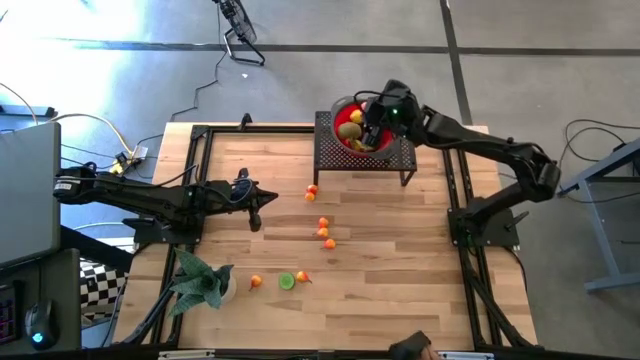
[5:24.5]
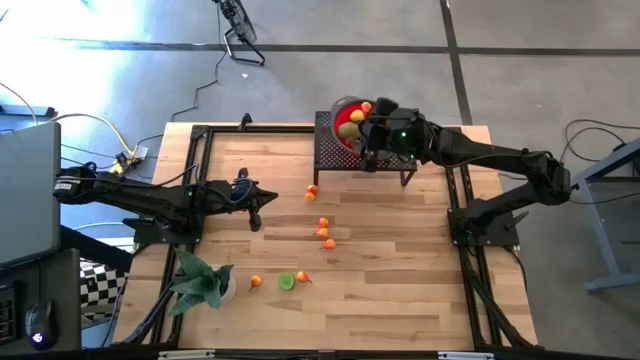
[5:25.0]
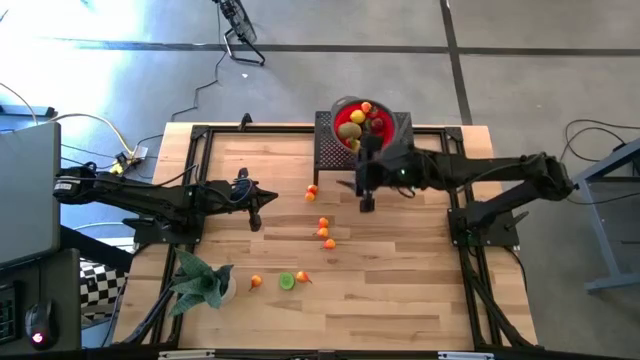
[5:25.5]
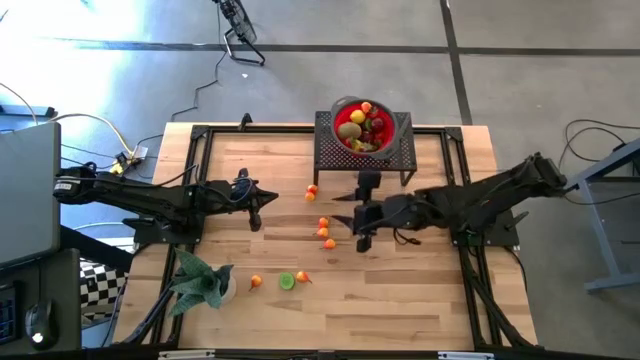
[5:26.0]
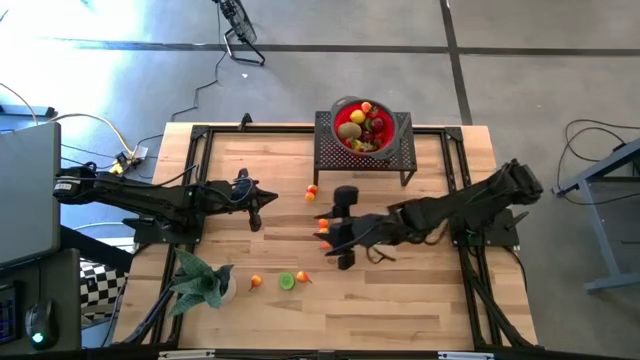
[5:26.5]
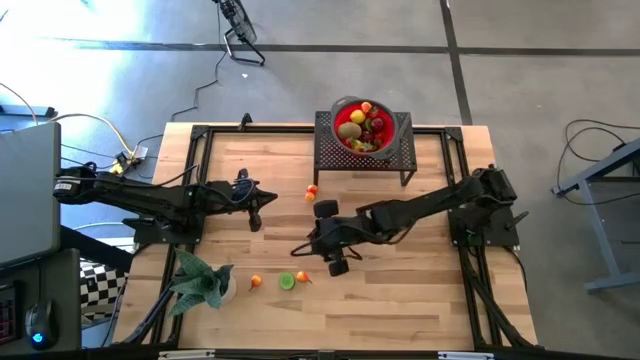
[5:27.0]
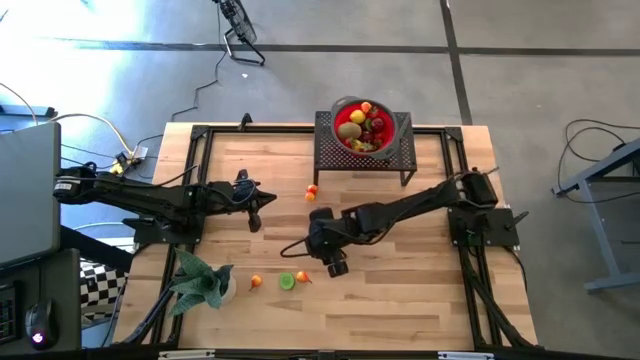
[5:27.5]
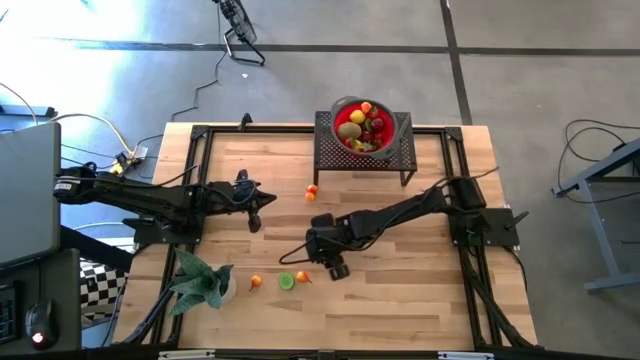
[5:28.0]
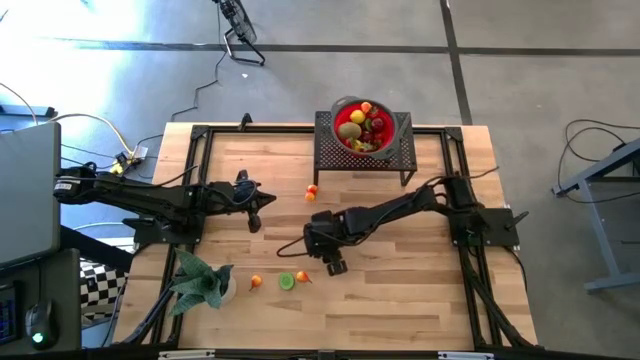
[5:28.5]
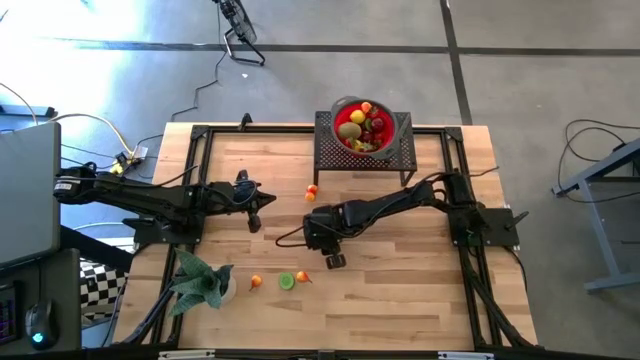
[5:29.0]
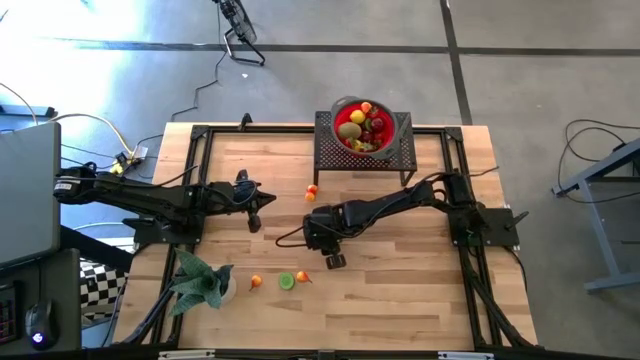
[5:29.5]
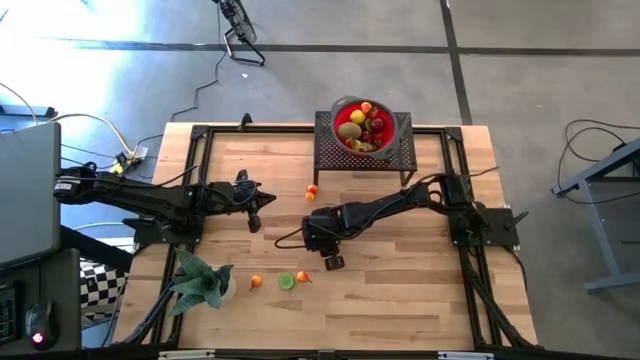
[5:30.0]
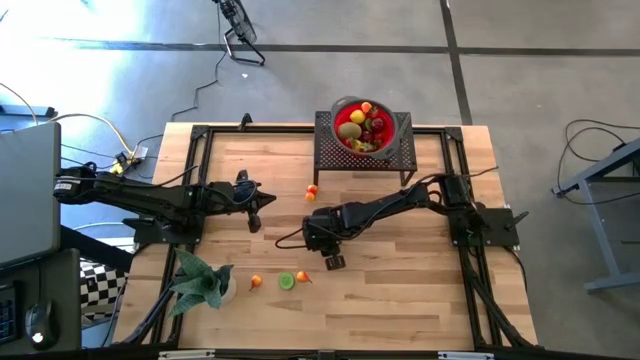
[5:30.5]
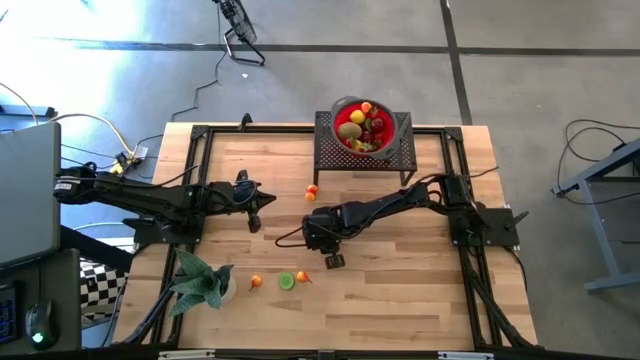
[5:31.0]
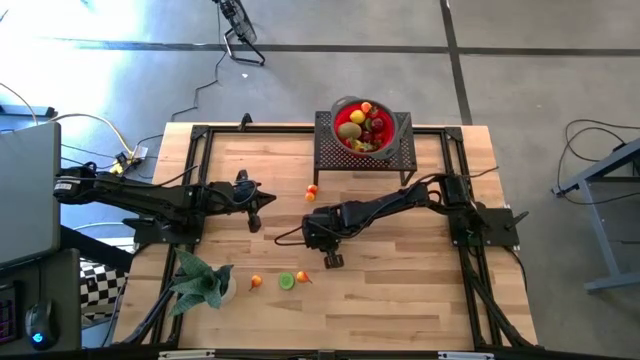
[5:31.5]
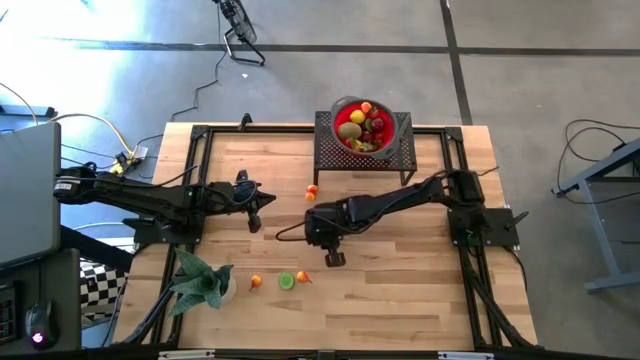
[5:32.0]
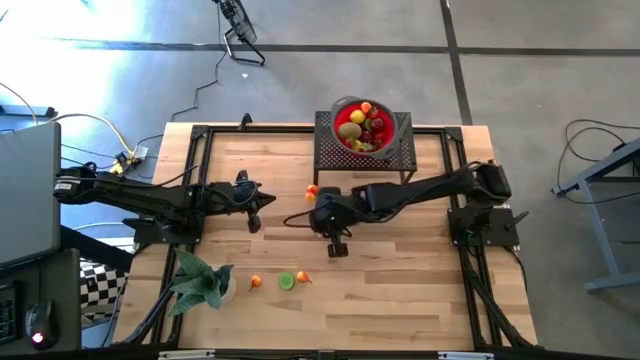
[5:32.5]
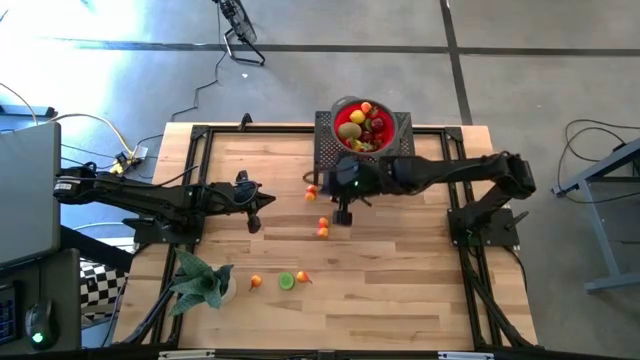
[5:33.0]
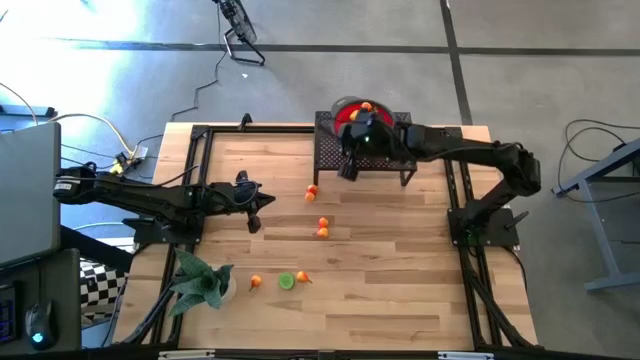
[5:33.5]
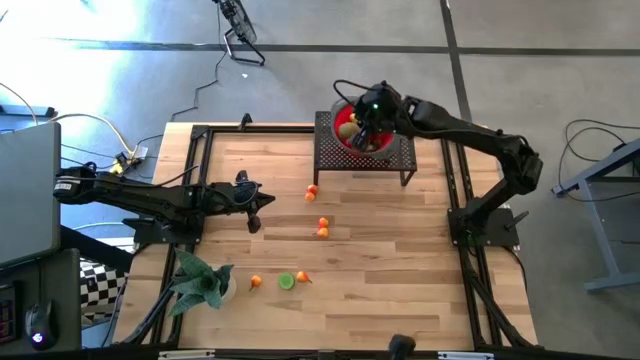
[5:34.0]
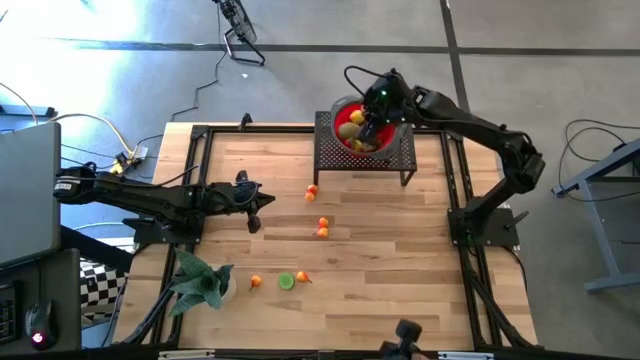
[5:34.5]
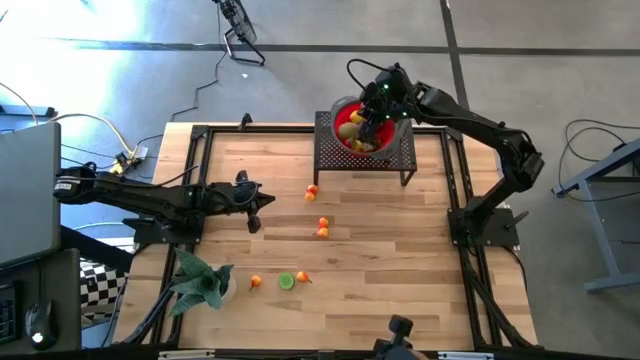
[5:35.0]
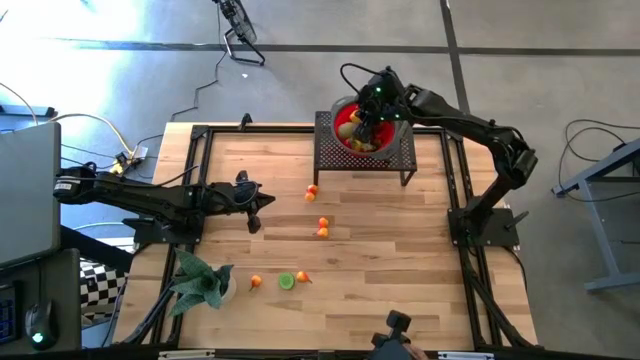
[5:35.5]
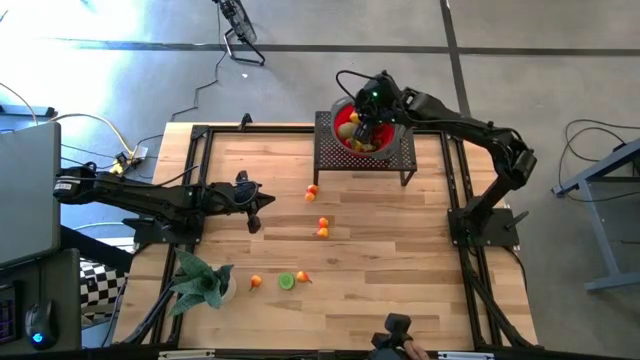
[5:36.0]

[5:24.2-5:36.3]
Task: Pick & Place Fruit
Put the pear into the strainer on the shelf

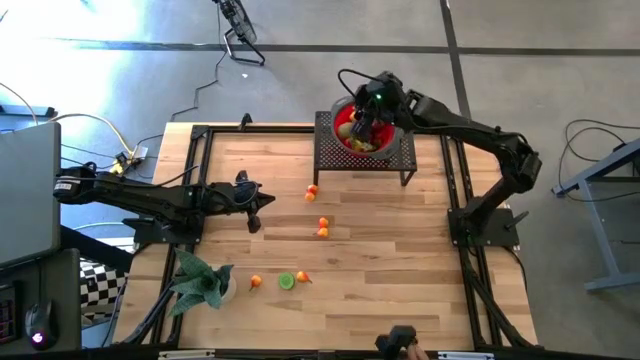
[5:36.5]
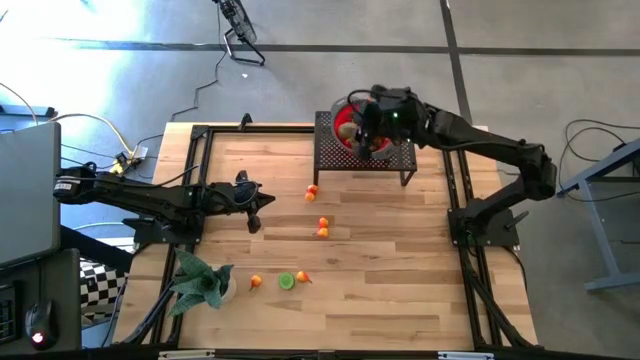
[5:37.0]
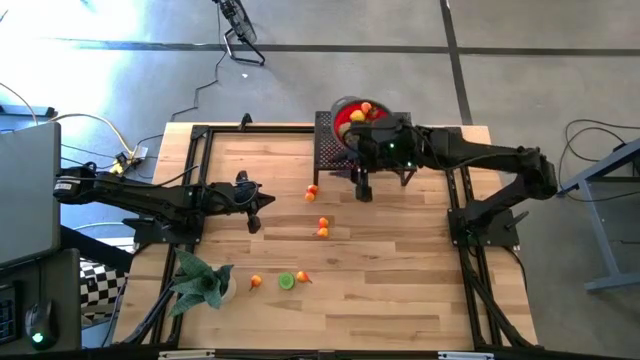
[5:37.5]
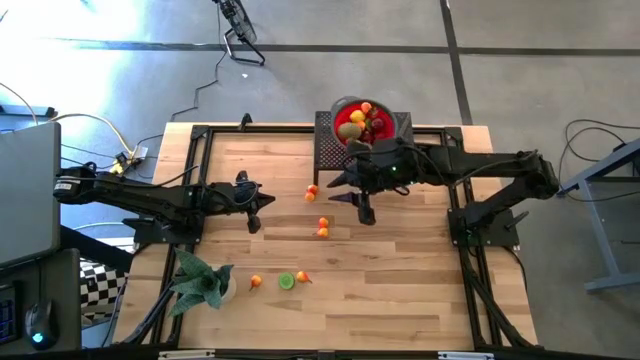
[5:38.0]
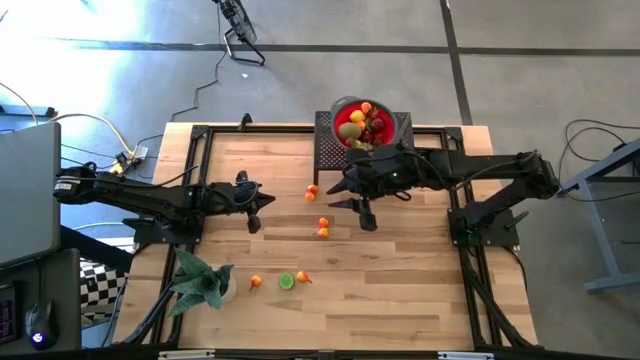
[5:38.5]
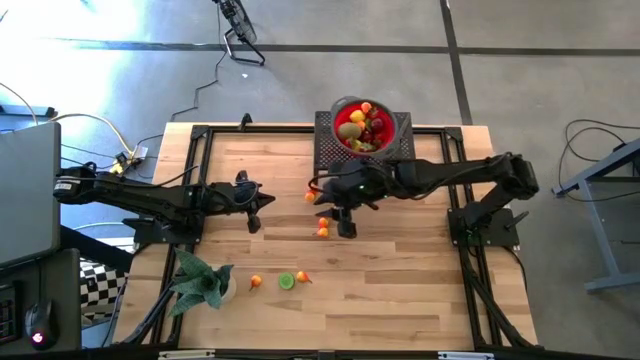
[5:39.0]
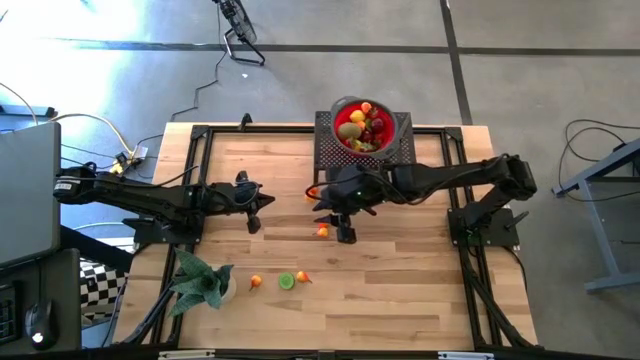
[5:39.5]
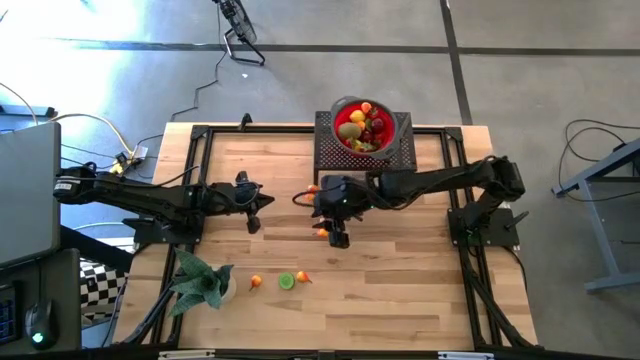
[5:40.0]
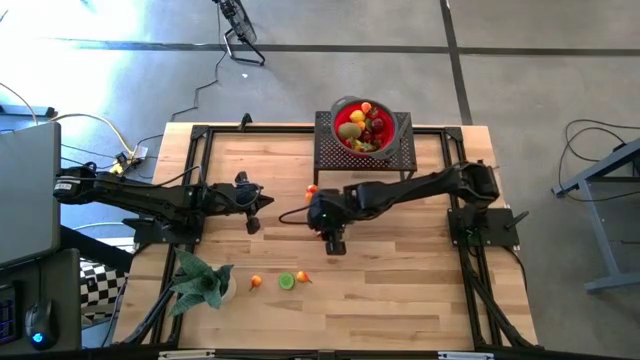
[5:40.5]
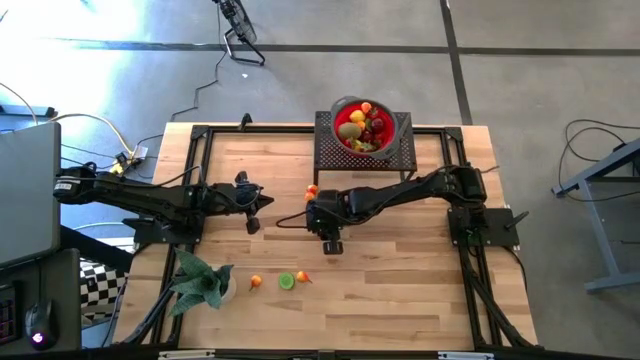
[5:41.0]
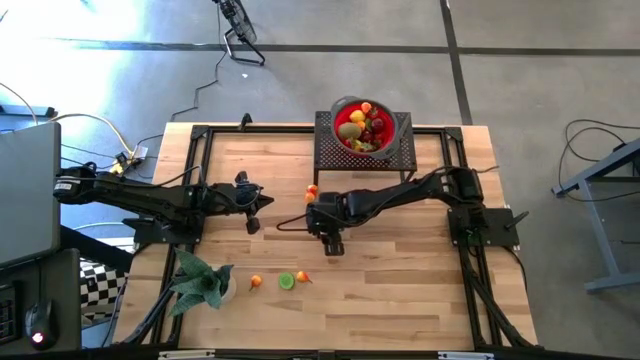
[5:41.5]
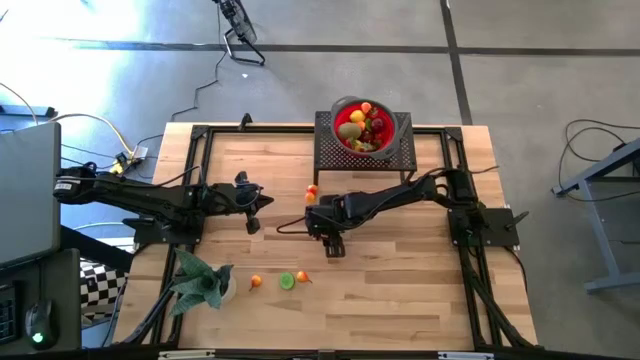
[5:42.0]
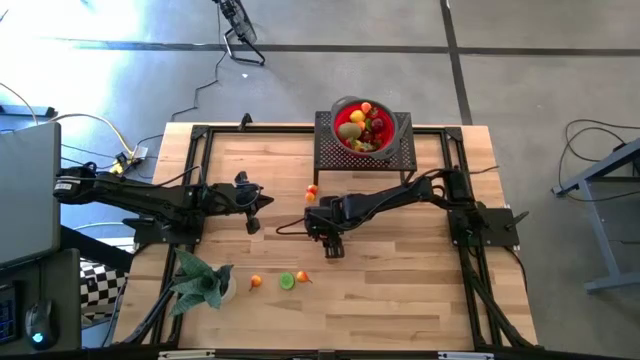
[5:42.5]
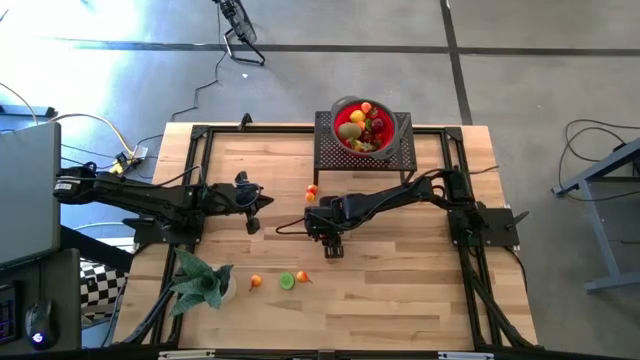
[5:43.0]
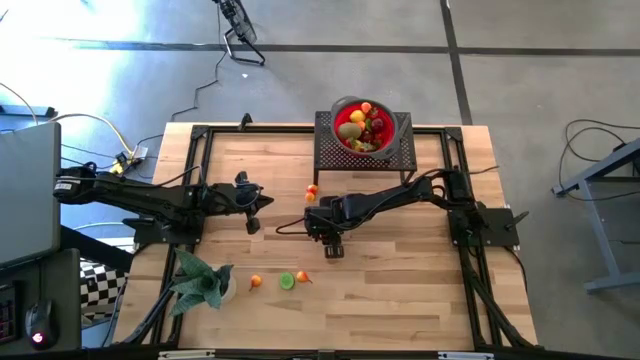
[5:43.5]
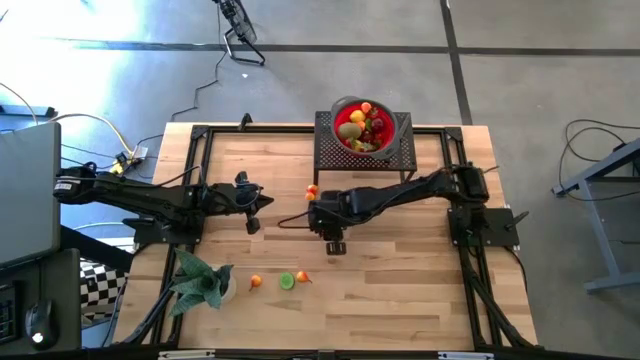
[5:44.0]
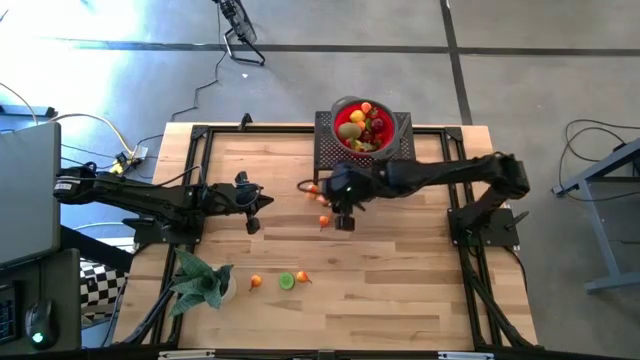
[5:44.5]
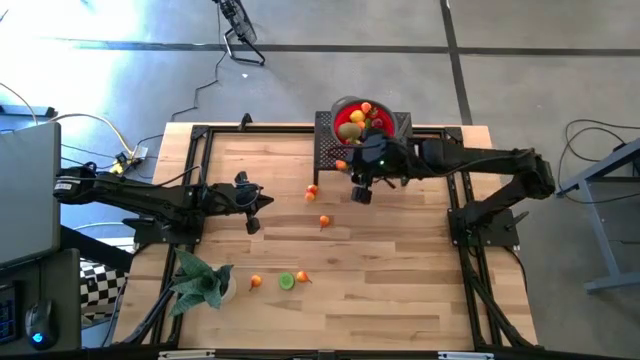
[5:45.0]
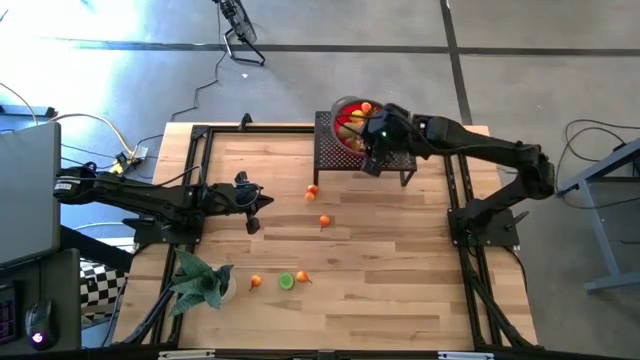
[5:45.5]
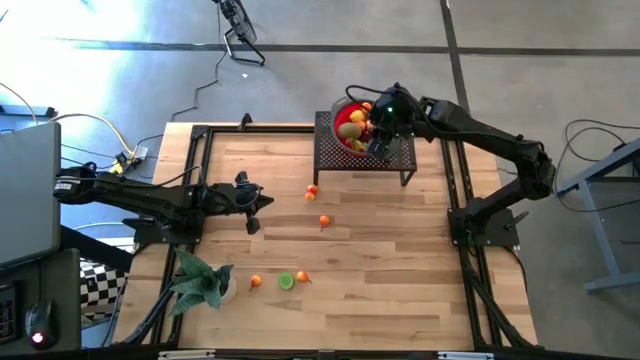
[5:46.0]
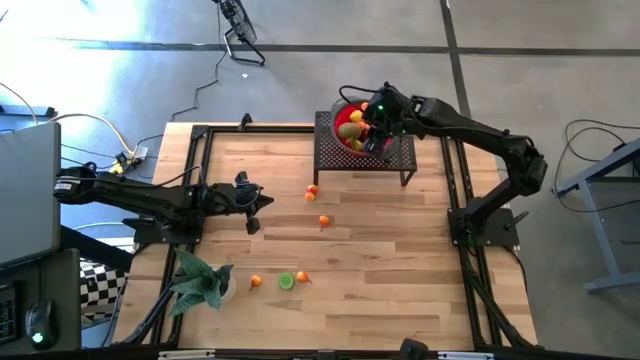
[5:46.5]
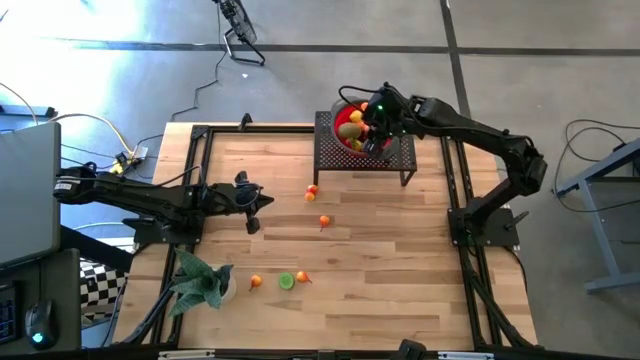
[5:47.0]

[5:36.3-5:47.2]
Put the pear into the strainer on the shelf
